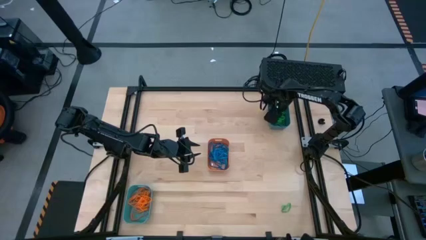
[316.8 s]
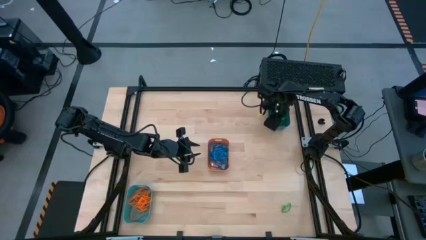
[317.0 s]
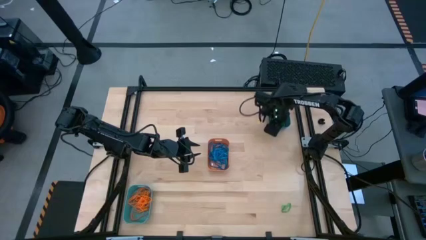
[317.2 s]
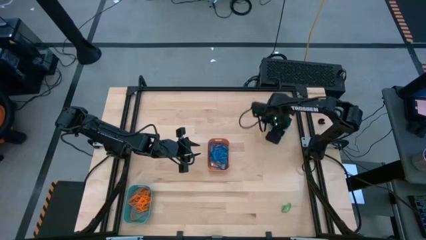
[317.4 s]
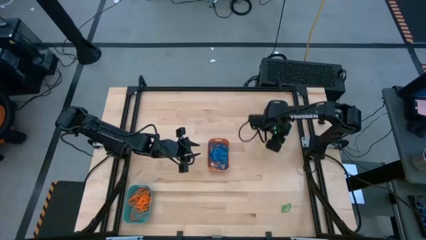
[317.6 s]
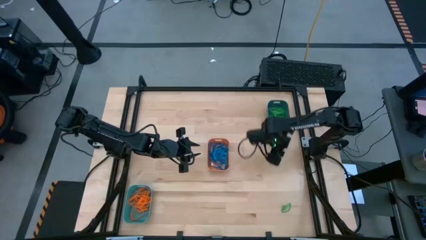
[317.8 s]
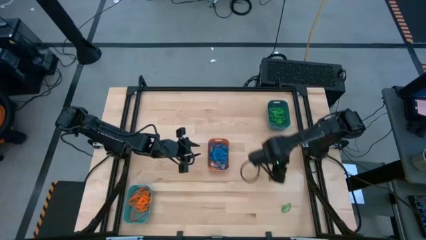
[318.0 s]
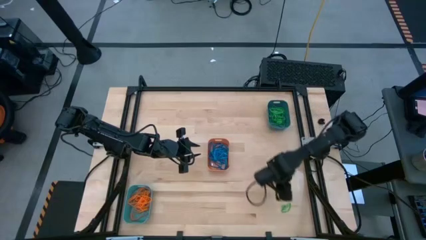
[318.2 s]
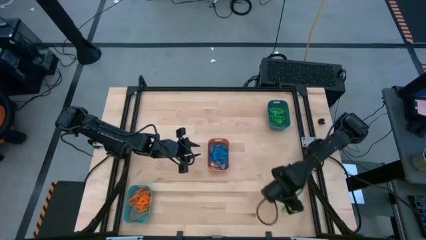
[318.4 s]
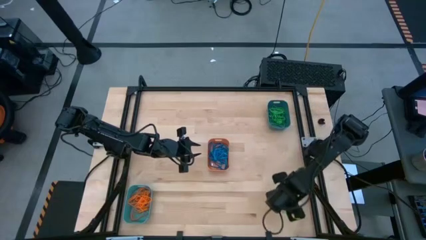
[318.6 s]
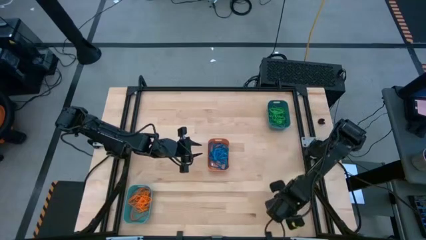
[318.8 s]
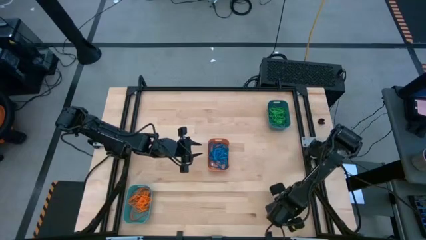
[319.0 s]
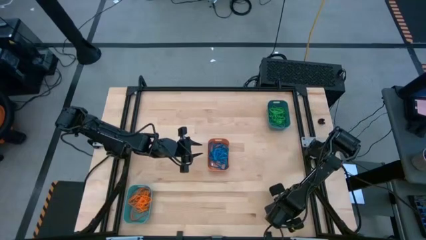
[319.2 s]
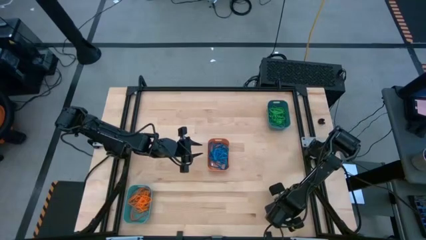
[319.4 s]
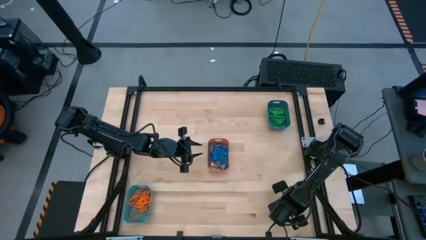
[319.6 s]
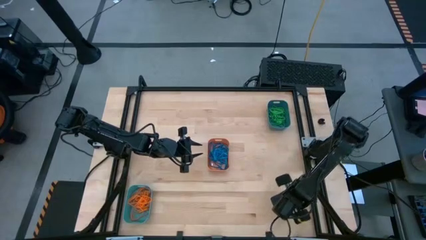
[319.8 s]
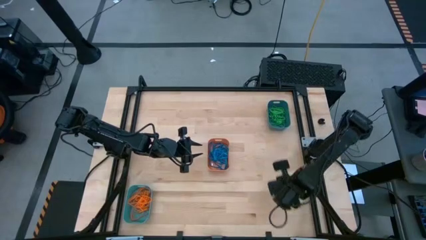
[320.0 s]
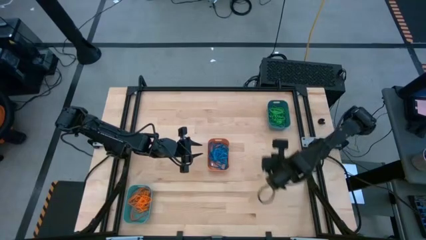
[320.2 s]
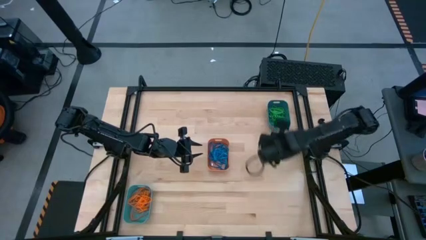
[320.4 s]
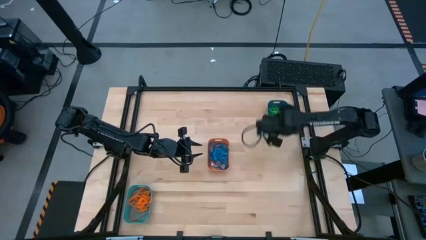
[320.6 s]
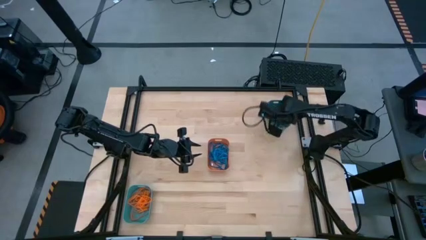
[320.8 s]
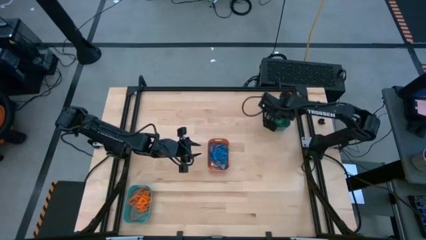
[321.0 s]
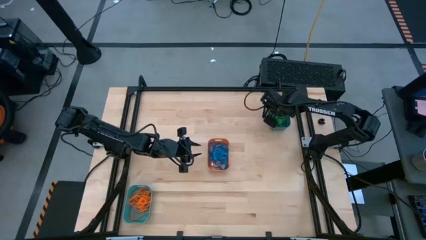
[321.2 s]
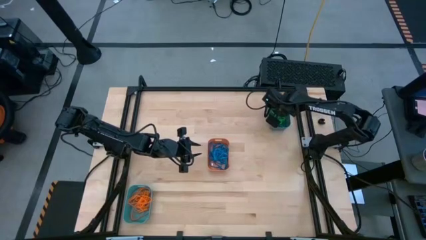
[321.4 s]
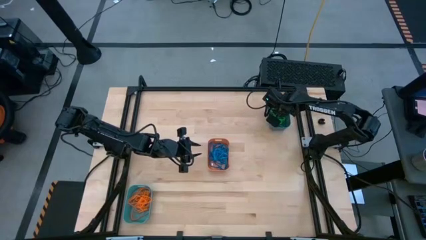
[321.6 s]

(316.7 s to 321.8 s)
Task: Sort rubber bands into baskets
Put the green rubber band into the blue bin

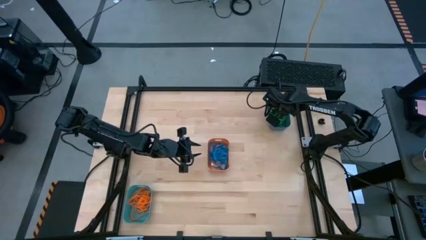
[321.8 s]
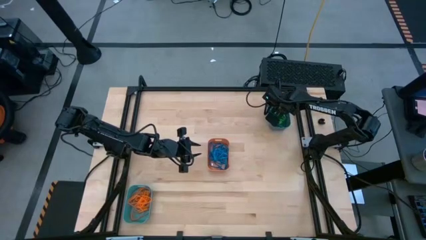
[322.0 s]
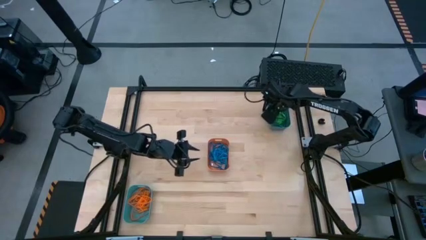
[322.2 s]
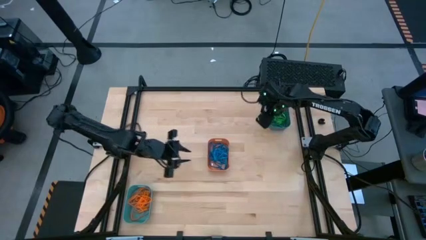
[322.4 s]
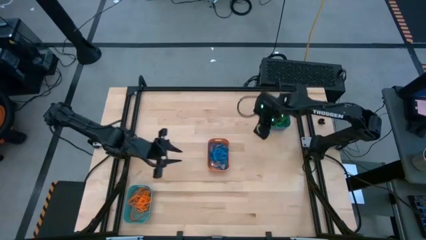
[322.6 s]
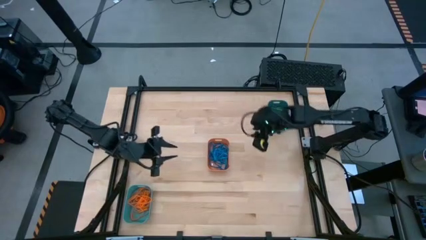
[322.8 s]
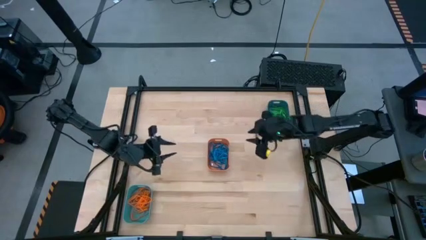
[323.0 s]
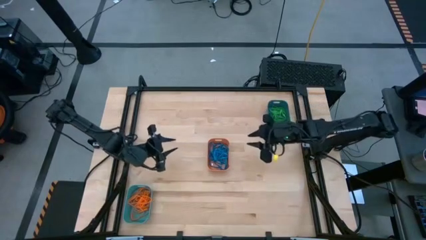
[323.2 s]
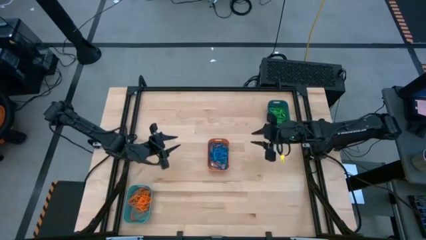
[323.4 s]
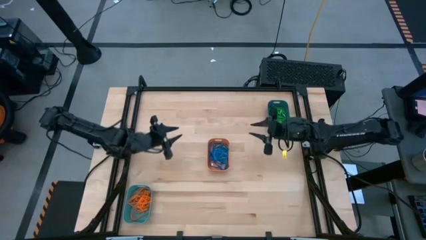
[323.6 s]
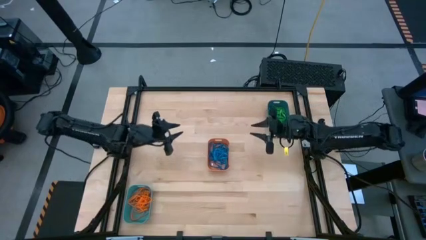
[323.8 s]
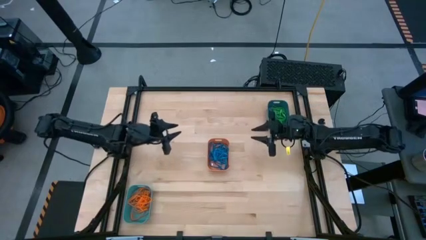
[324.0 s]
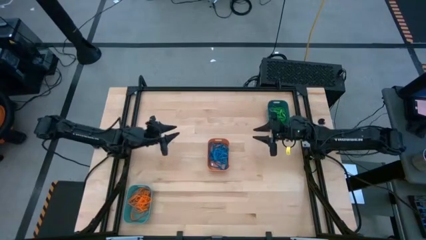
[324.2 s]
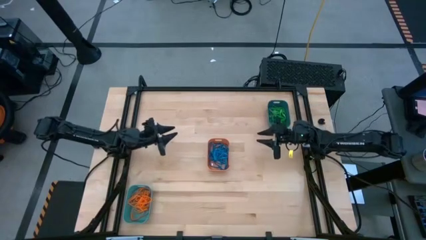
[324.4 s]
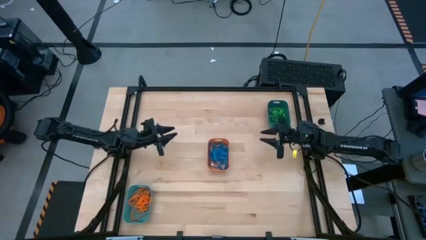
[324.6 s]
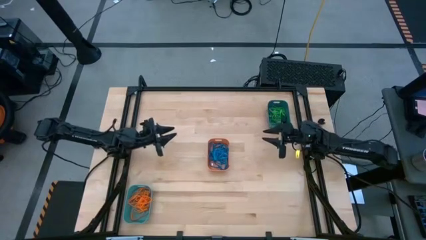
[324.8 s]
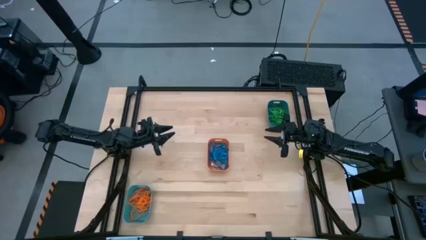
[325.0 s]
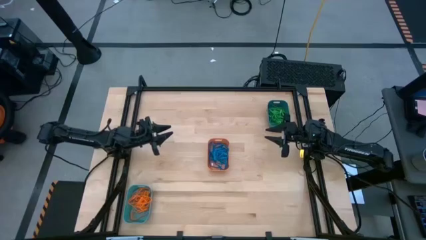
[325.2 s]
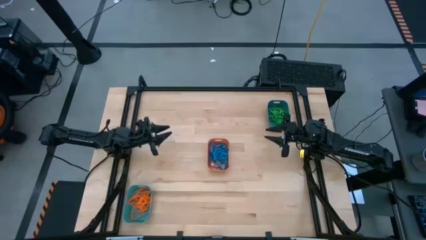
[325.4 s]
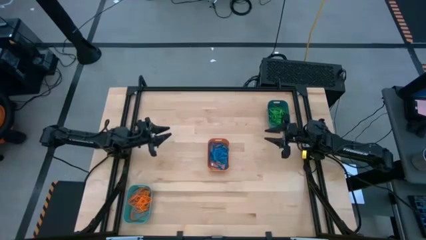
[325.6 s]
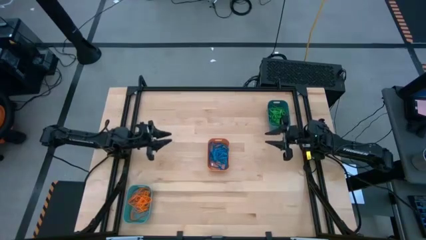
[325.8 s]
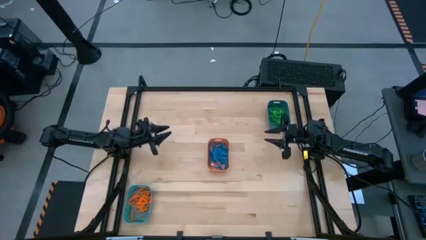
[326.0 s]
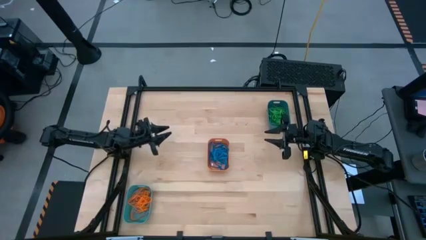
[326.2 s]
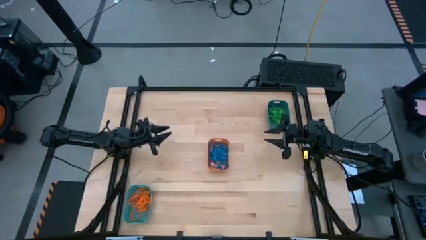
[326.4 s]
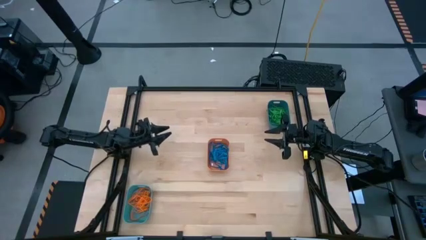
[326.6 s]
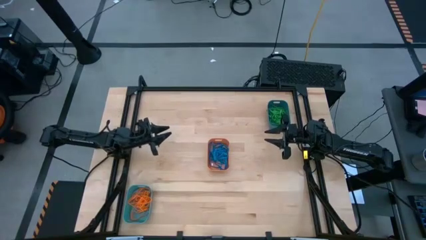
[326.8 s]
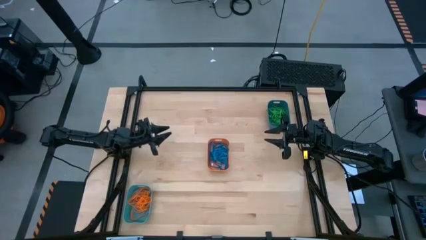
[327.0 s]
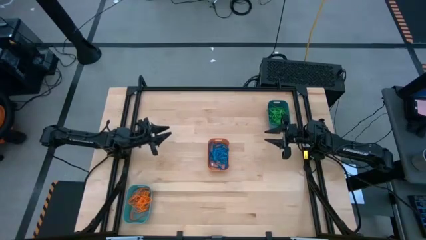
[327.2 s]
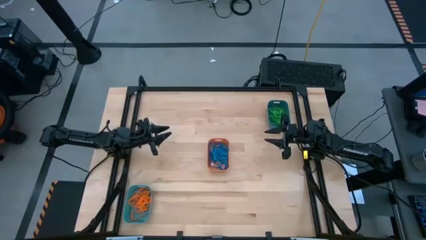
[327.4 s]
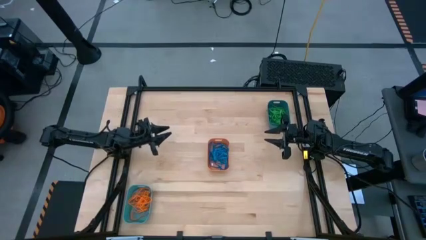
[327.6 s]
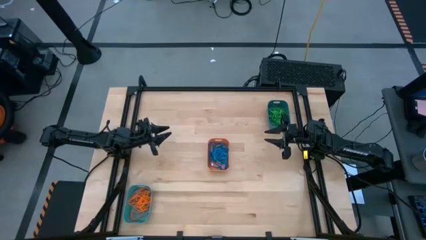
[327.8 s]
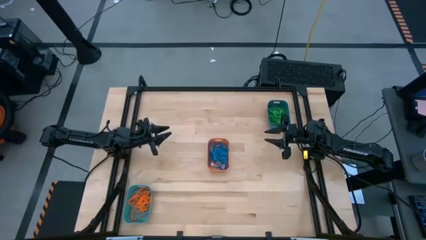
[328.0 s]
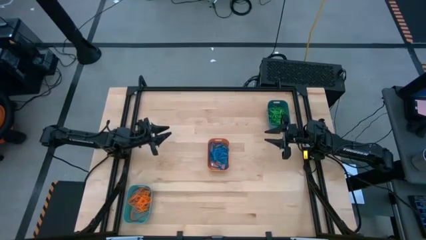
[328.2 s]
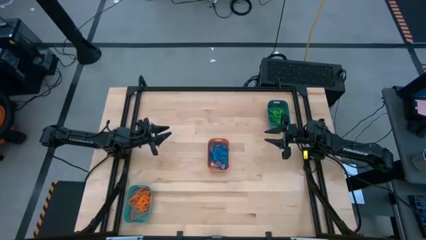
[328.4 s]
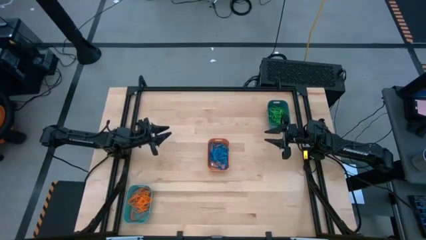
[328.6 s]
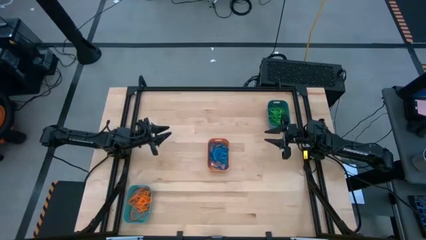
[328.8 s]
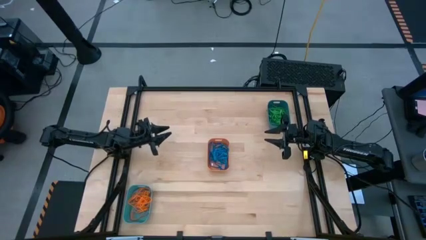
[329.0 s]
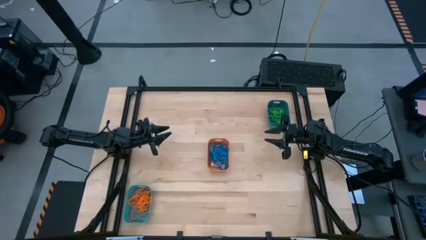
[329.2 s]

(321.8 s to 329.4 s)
Return to Home Position
